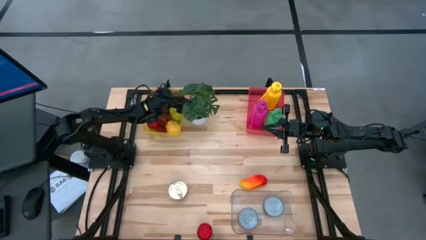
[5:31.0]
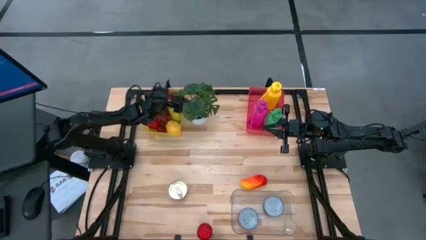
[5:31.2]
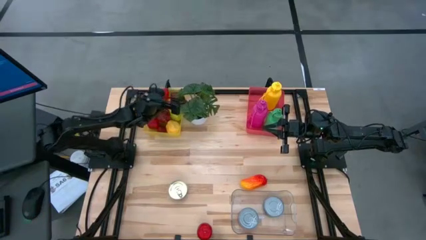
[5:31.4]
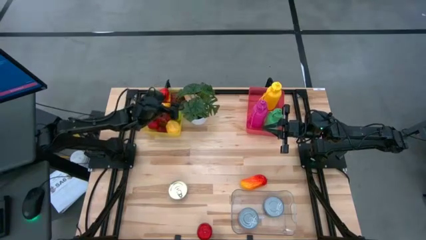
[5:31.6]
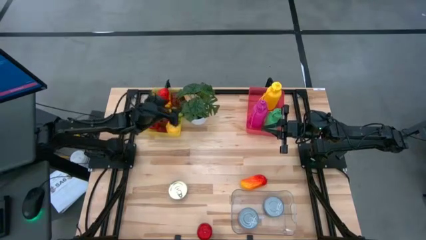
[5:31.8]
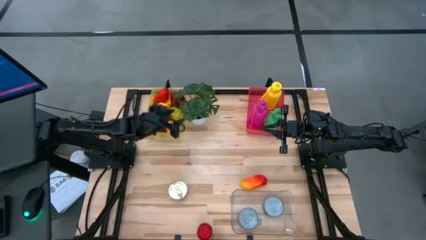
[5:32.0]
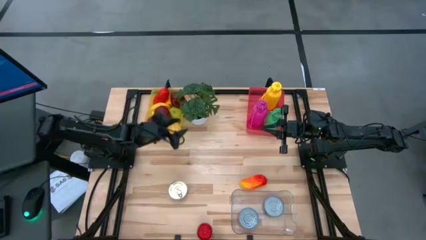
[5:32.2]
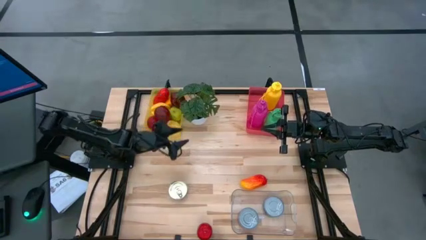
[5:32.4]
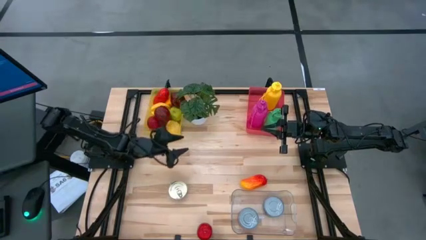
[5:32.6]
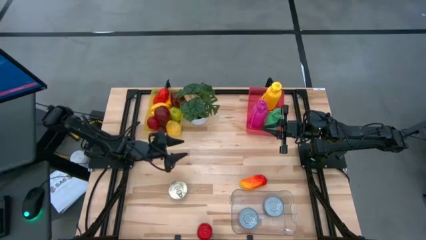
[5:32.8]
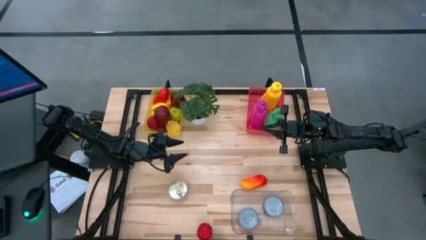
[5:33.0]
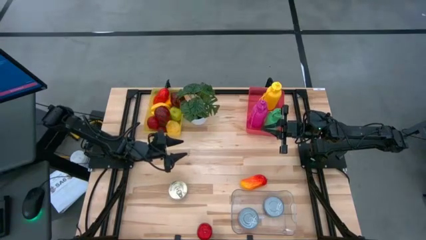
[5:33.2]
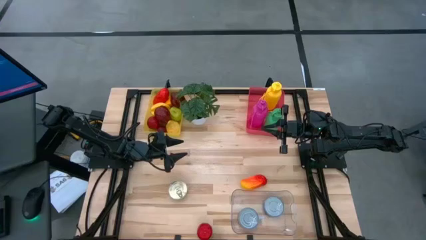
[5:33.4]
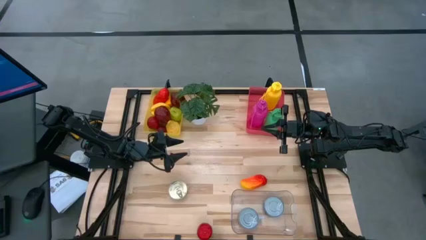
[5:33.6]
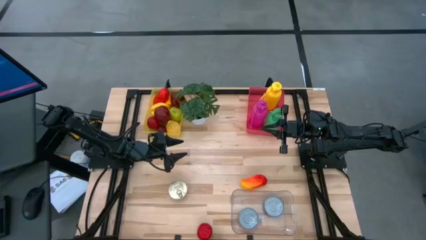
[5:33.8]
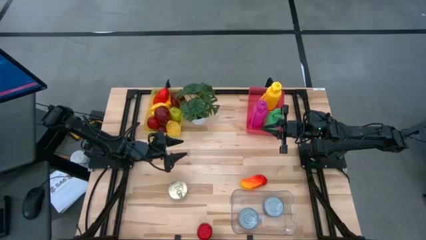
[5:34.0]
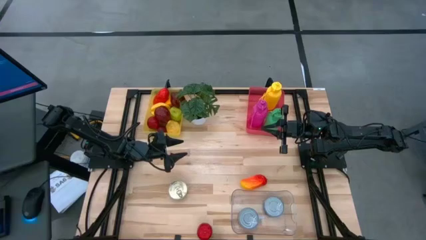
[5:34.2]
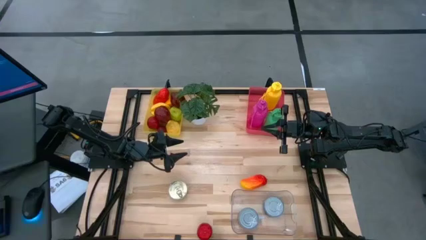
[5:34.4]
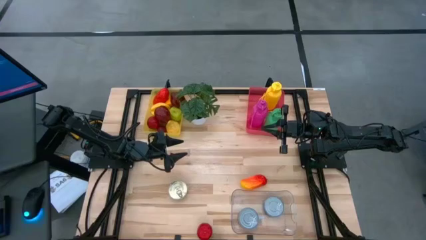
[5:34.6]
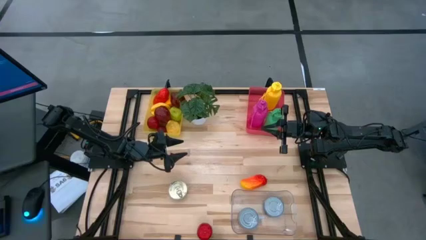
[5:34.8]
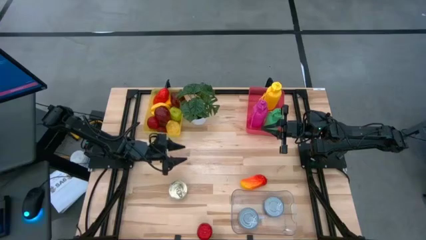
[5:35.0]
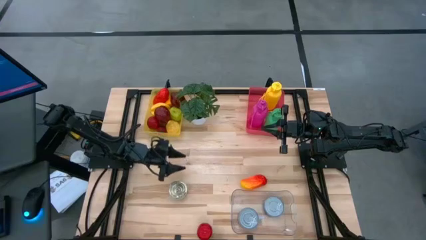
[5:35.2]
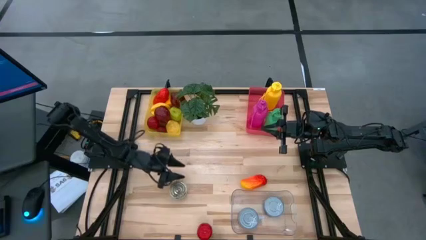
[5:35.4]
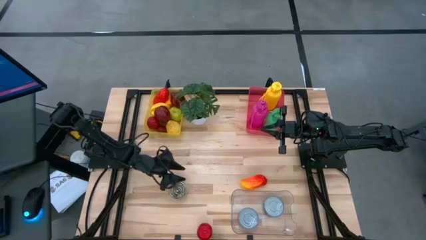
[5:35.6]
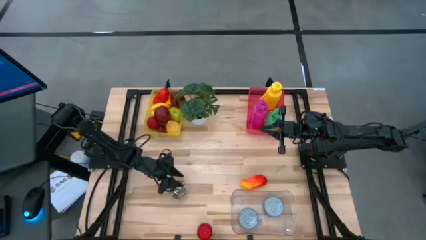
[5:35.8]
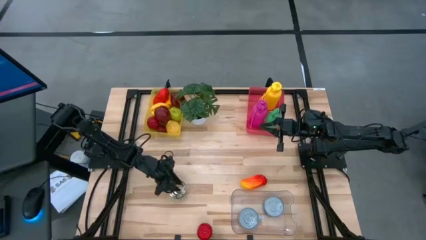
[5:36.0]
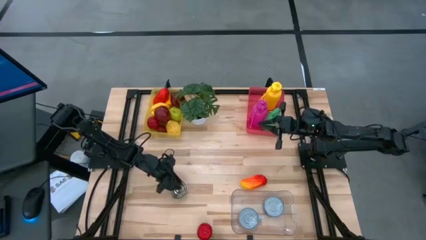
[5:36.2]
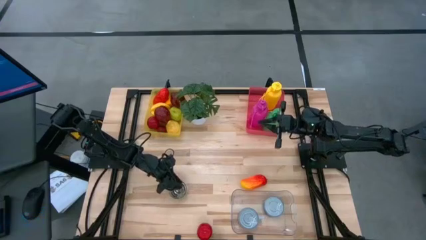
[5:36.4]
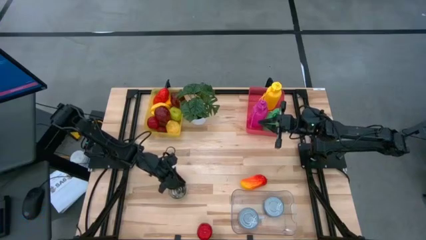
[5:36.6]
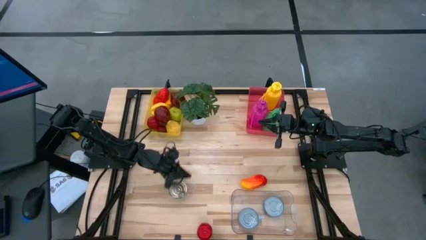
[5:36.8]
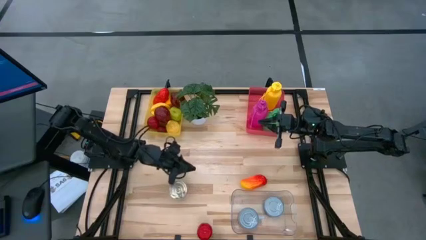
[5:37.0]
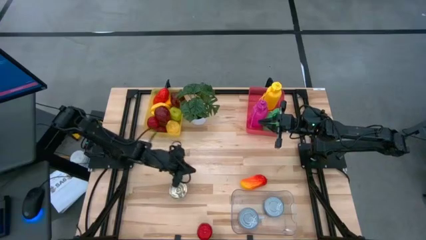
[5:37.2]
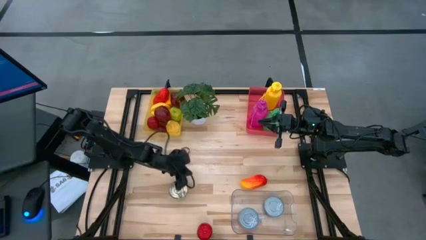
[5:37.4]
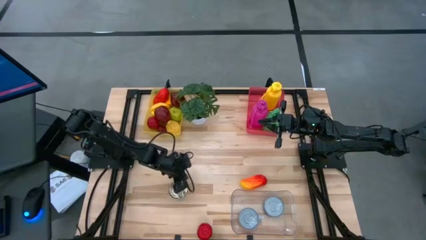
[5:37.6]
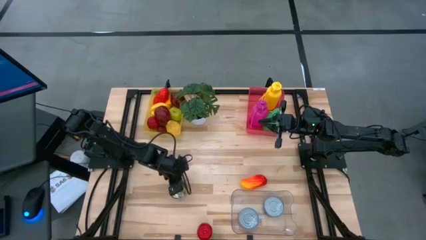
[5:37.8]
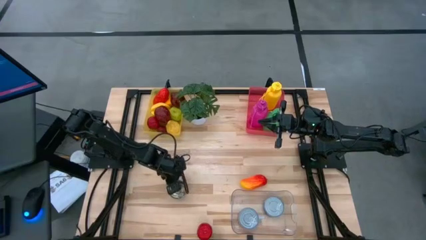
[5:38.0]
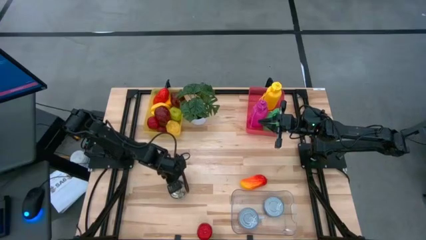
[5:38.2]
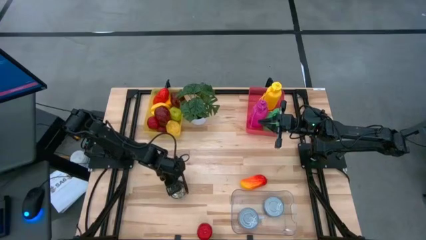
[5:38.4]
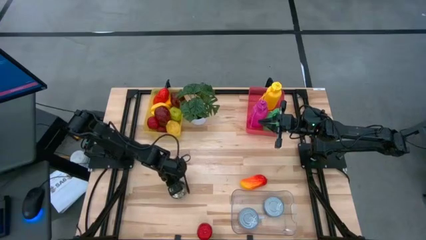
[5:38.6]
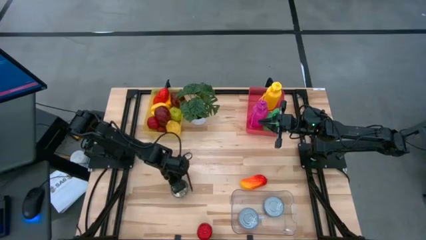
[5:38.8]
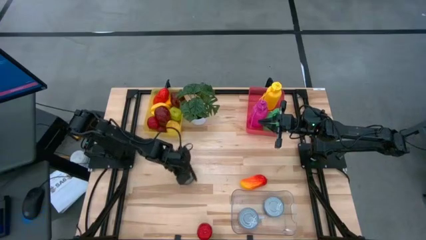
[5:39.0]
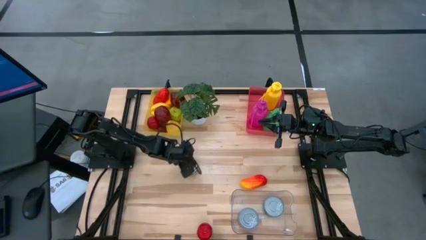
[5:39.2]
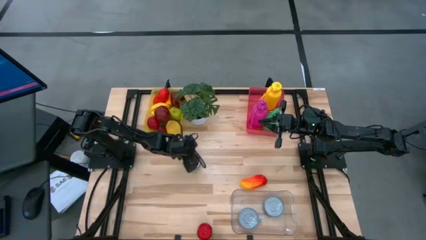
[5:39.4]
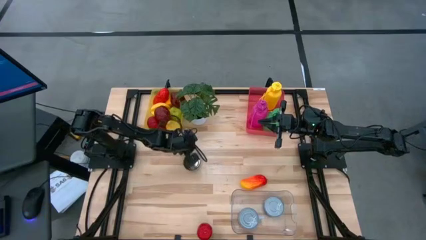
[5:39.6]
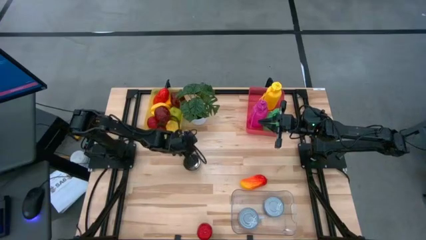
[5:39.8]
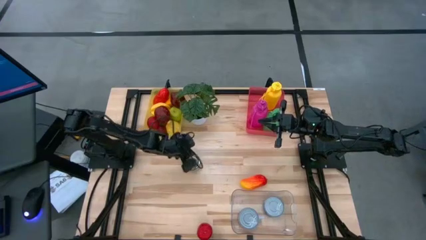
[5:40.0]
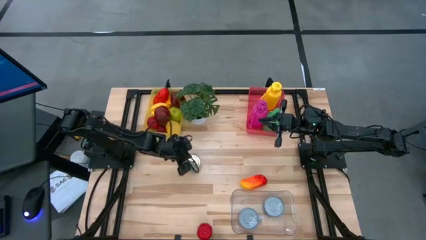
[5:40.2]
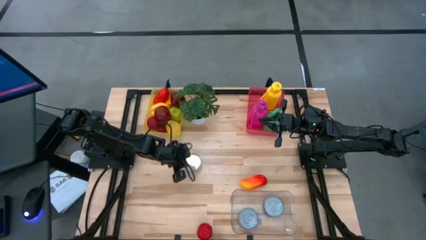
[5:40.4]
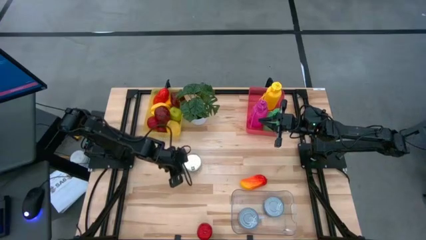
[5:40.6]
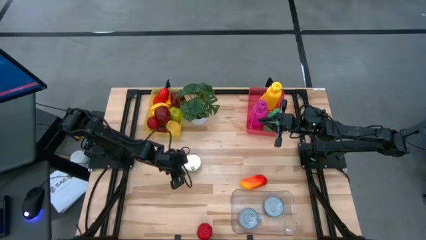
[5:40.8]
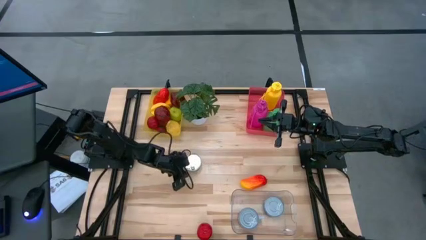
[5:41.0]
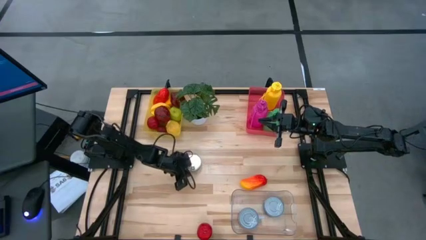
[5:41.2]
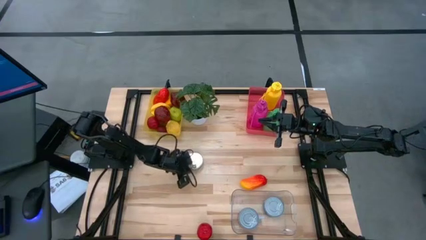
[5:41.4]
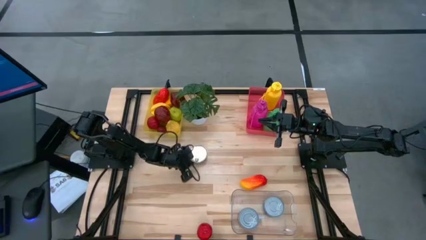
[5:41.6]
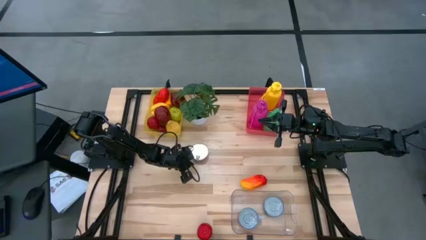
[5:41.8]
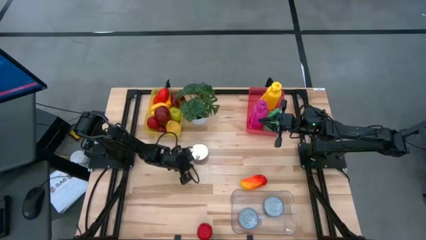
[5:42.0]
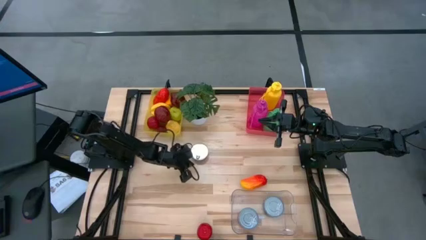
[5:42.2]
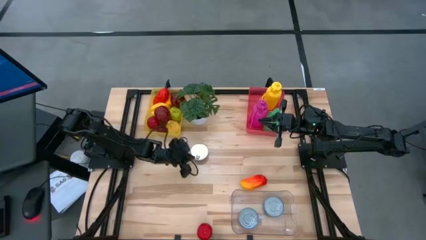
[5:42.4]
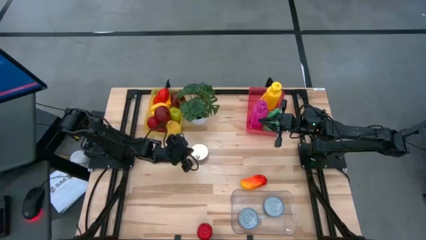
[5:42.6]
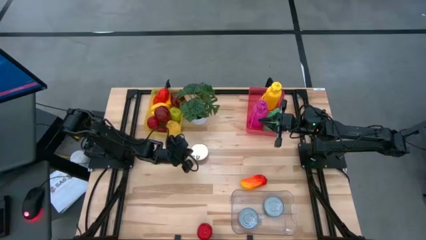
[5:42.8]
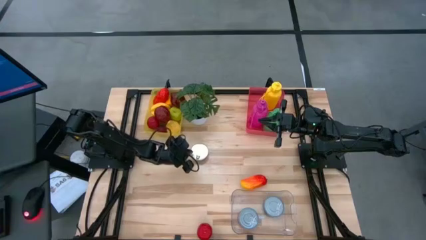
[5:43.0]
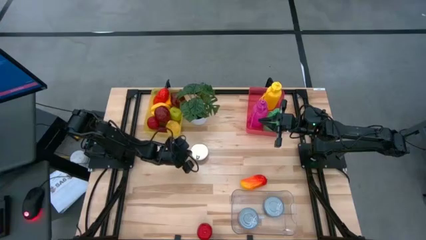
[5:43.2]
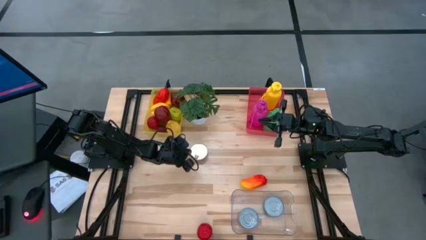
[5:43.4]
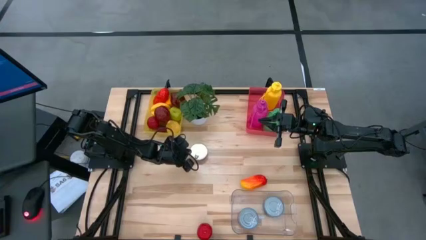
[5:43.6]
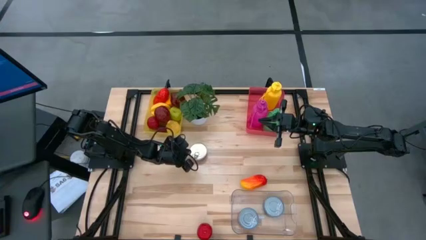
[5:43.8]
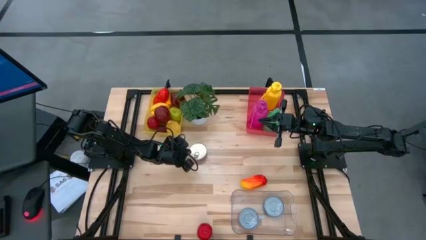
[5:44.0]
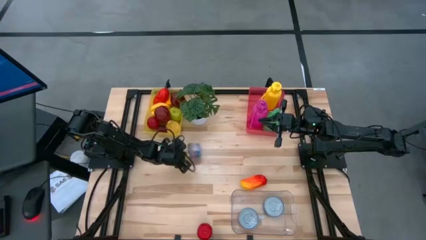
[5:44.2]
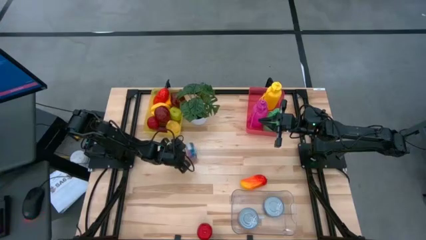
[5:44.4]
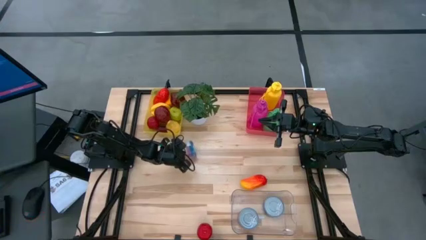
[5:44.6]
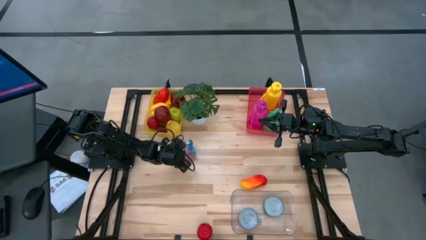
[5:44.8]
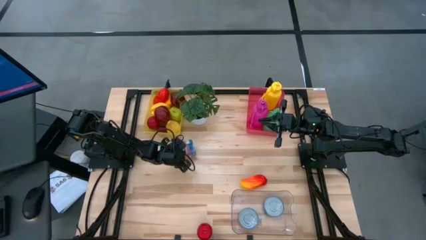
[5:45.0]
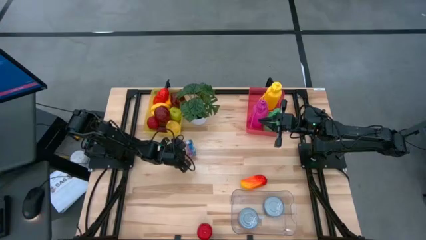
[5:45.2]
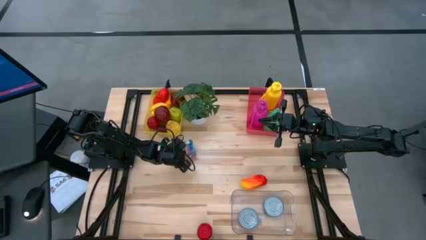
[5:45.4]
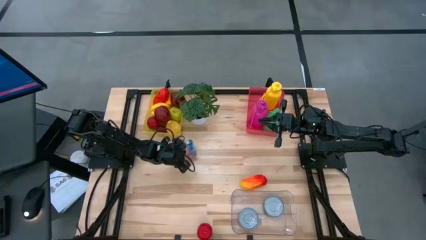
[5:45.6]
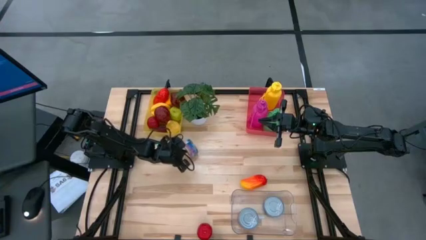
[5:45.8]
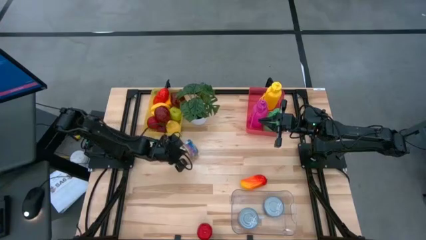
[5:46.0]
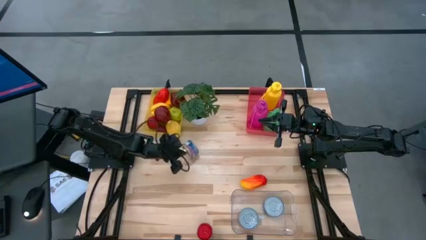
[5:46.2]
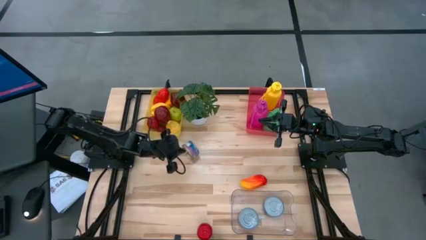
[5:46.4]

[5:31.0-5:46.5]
Task: Pick & Place Food Item
Put the blue pink tuna can into the transparent bin

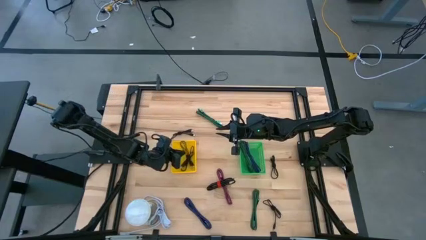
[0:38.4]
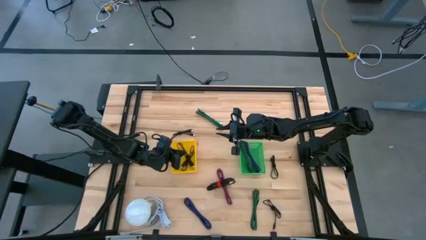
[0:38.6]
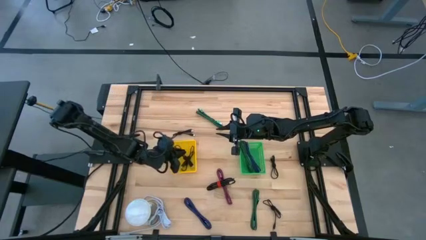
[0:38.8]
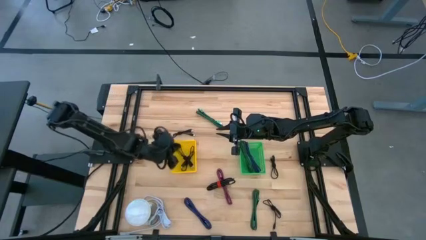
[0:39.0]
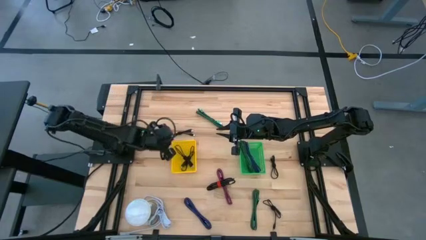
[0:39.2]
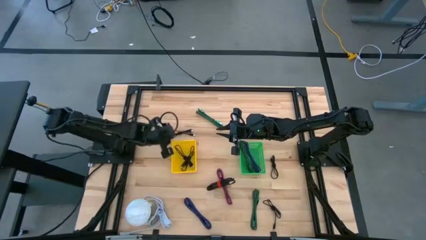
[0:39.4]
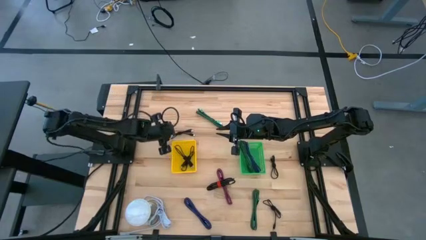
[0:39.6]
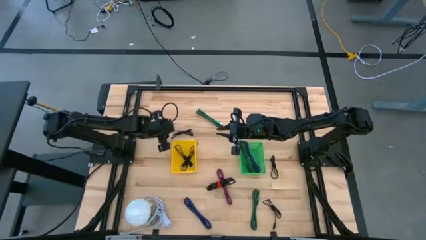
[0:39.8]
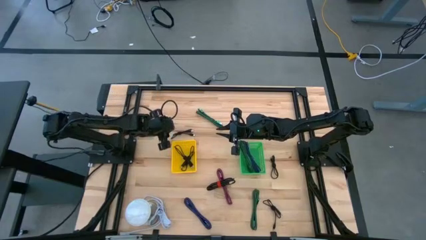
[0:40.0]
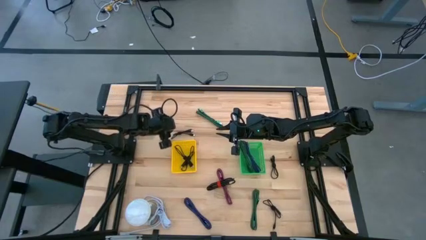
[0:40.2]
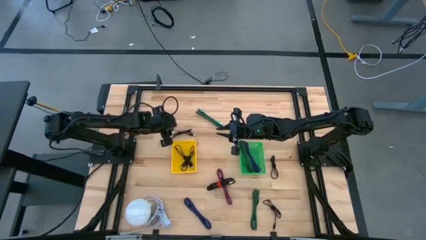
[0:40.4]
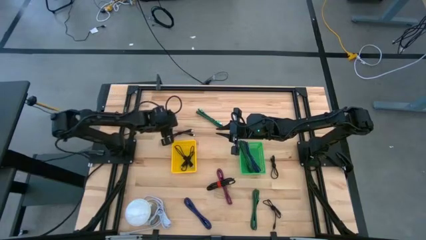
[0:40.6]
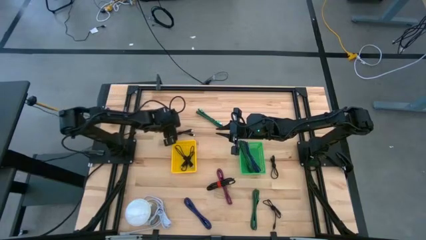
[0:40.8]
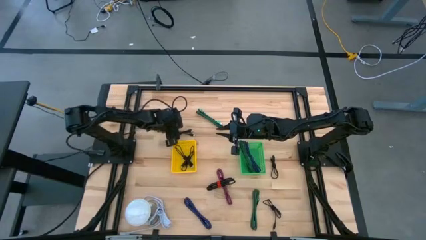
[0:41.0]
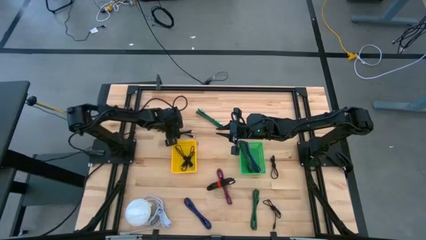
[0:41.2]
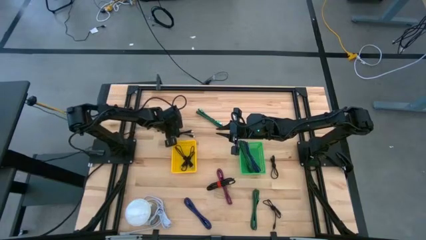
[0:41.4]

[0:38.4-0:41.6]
Task: Pick & Place USB Port
Put the black charger cable into the yellow bin
